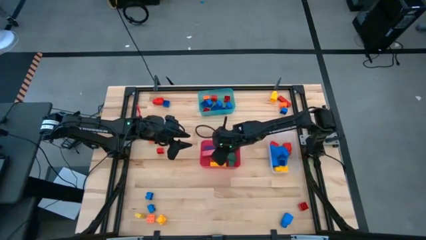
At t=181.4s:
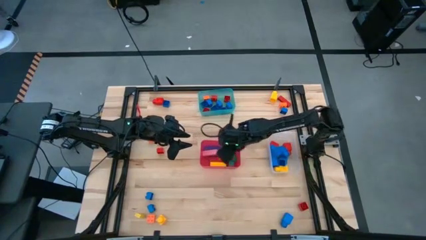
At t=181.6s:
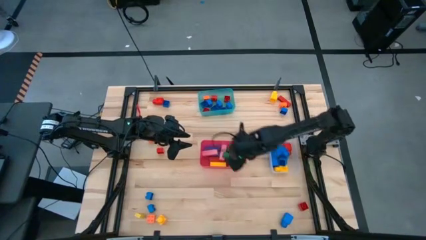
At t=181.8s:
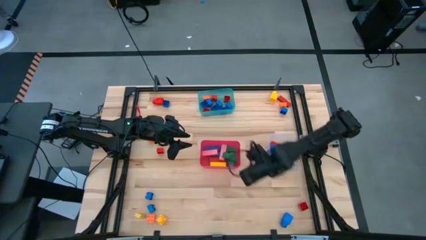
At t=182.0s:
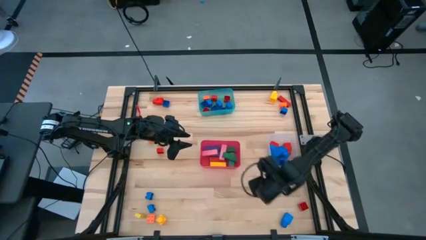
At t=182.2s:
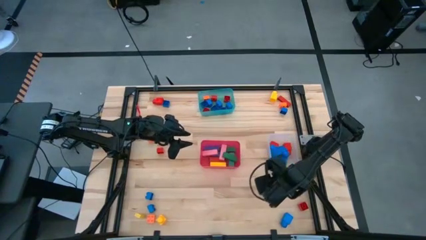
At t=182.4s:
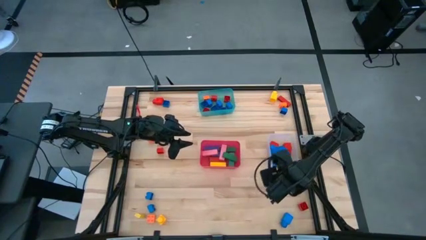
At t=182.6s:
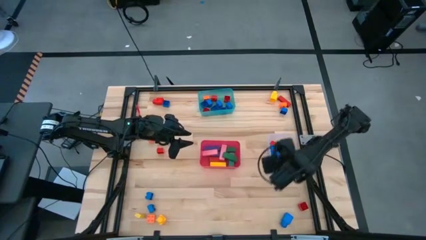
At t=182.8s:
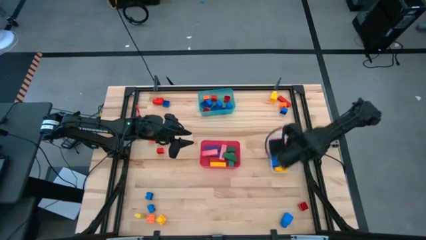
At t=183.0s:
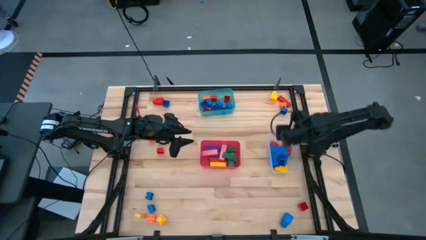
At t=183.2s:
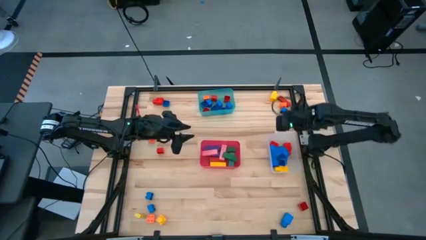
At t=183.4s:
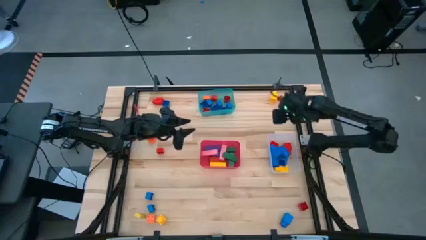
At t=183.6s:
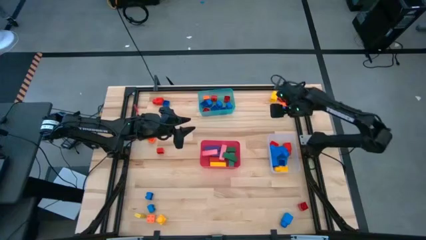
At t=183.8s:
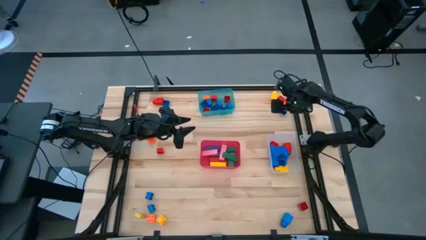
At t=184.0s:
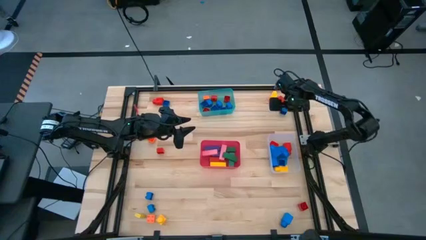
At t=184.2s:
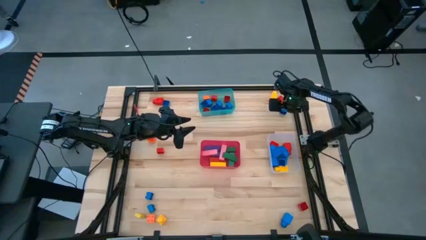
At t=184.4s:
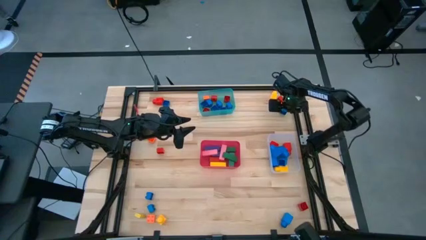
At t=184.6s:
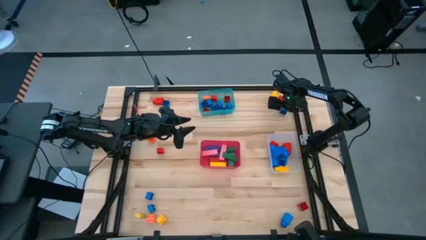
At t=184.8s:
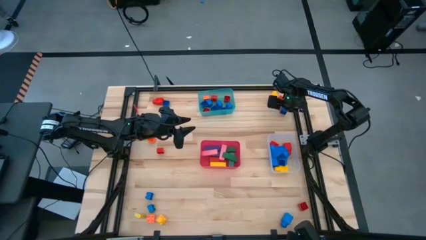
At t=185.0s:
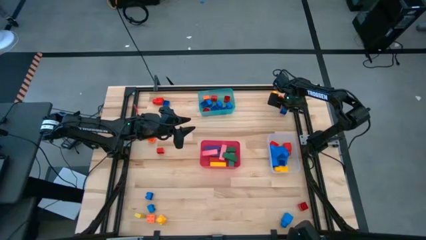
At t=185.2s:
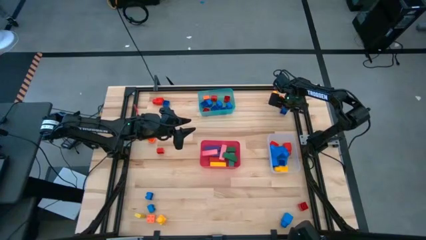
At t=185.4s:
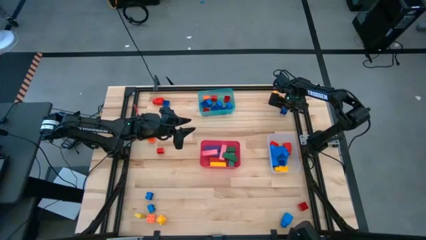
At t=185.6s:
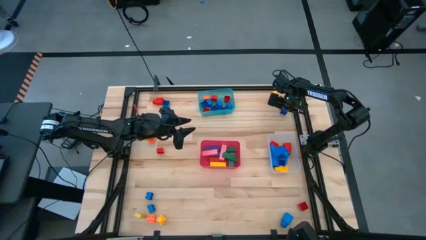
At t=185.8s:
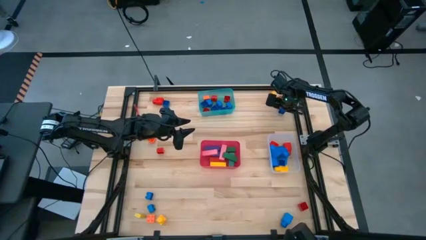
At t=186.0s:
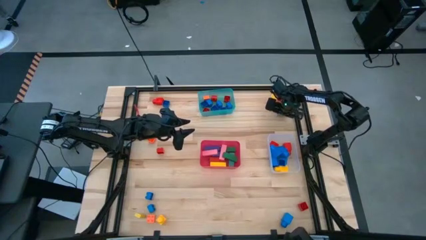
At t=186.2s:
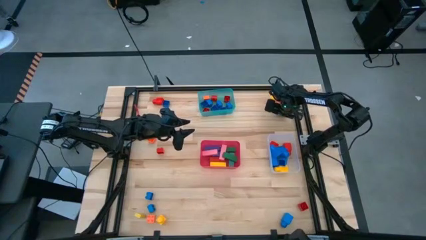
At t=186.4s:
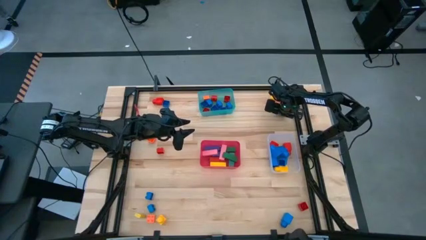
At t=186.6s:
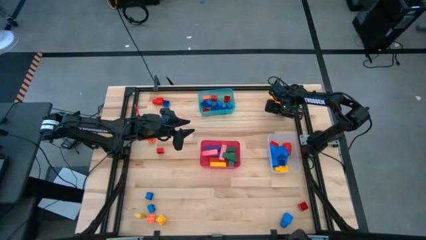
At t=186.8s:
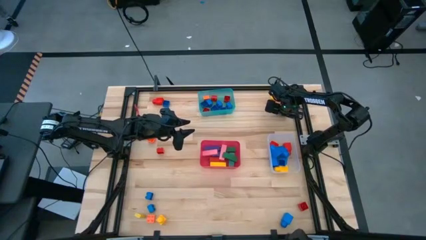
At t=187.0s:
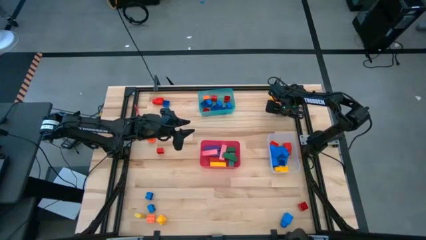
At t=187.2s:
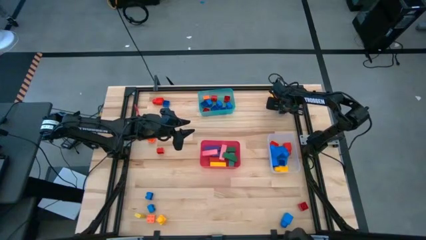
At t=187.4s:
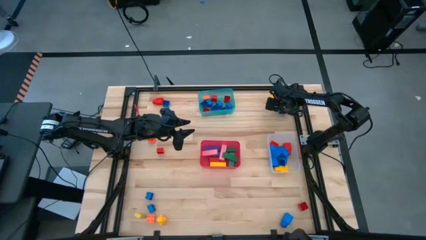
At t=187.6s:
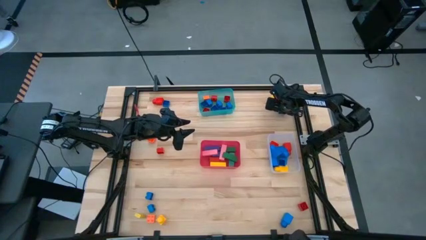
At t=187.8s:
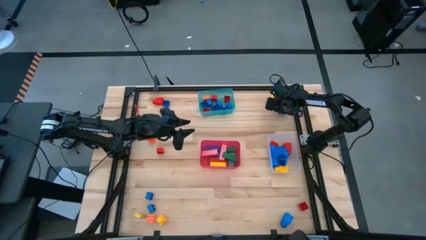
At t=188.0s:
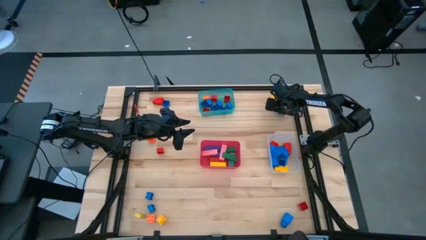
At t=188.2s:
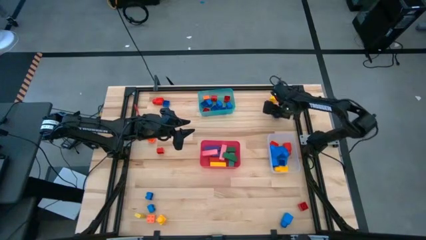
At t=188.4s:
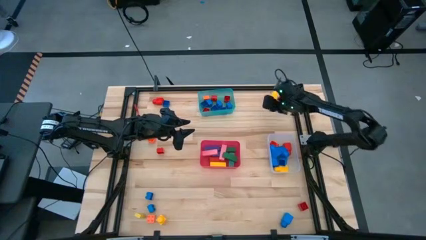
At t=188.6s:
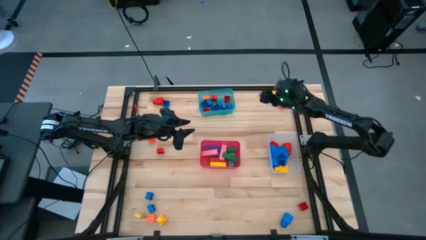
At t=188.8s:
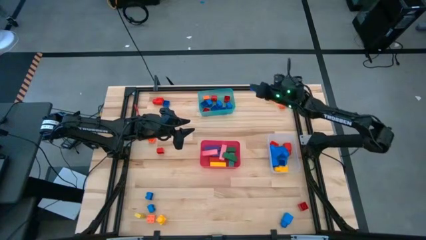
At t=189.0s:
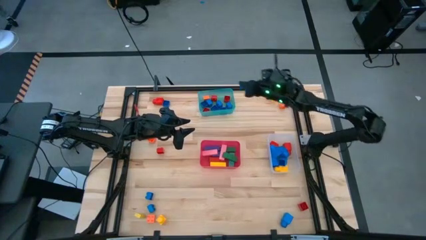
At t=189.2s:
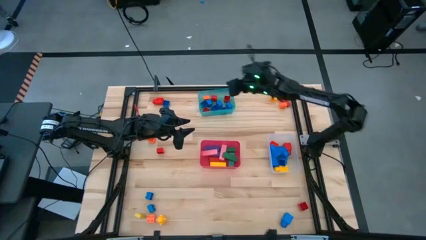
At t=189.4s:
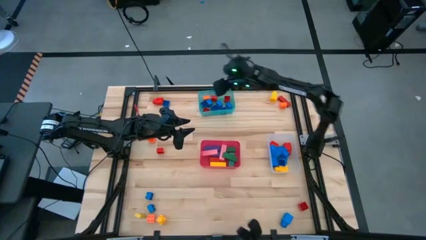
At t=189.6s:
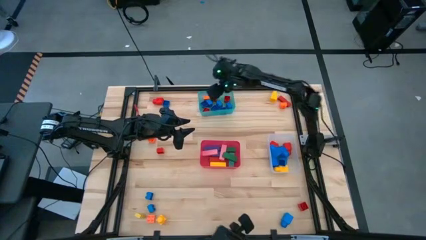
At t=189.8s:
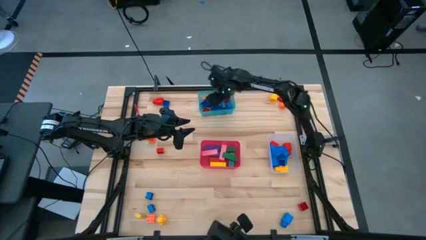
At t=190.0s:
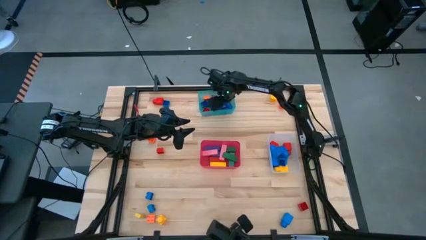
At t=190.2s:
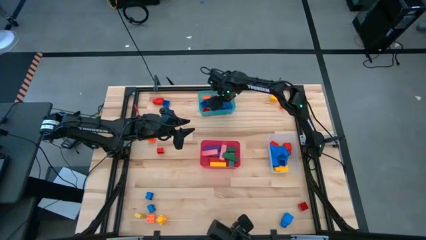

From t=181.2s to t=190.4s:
Task: Sort blocks by size
Put the blue 4 stud game piece into the blue bin

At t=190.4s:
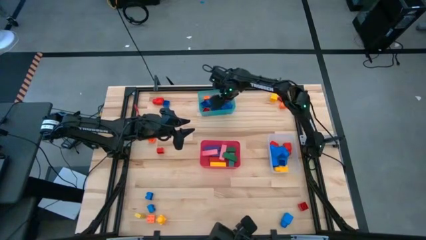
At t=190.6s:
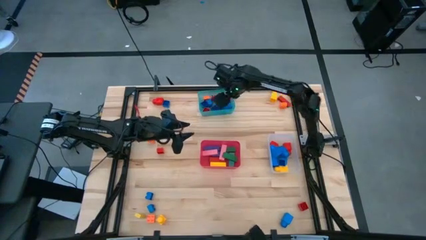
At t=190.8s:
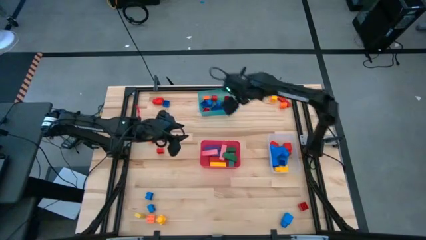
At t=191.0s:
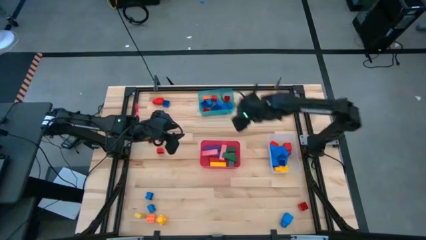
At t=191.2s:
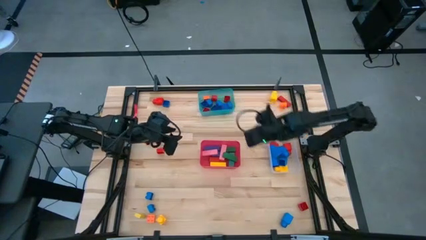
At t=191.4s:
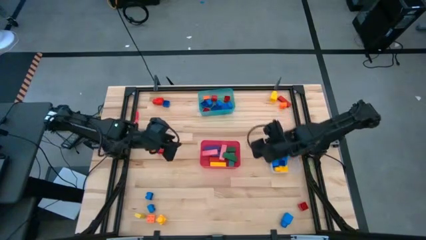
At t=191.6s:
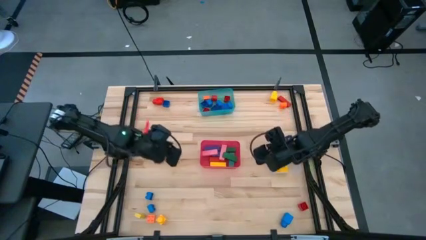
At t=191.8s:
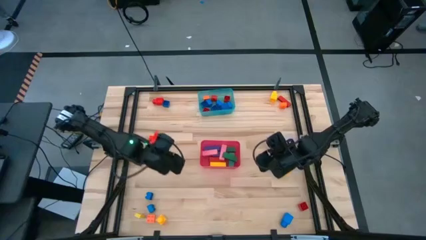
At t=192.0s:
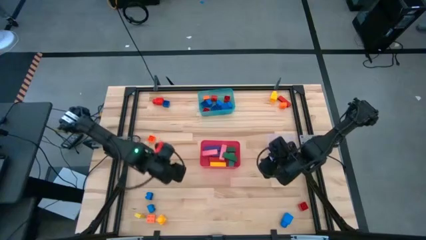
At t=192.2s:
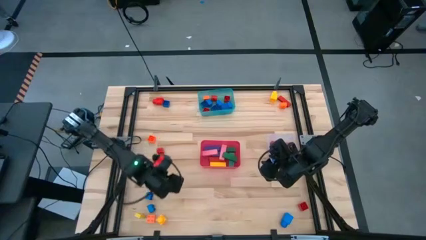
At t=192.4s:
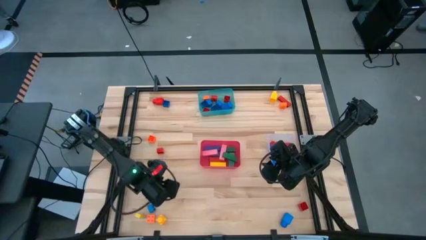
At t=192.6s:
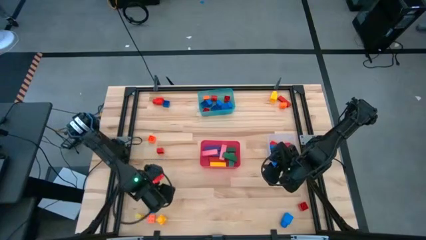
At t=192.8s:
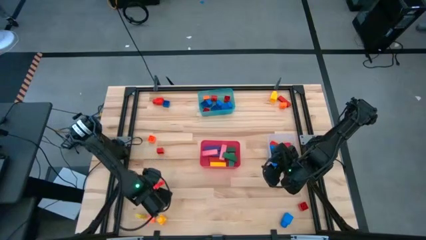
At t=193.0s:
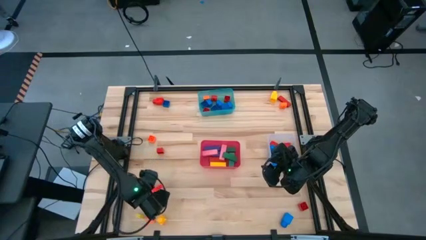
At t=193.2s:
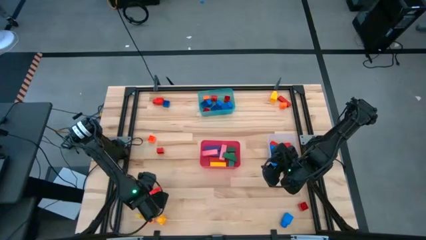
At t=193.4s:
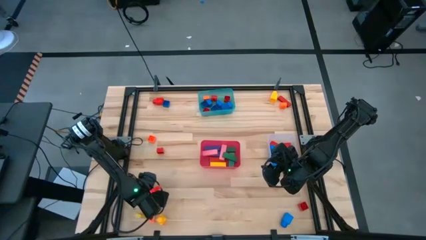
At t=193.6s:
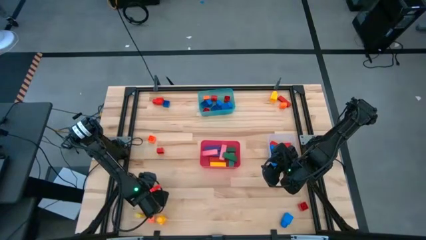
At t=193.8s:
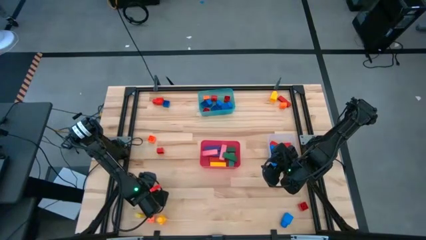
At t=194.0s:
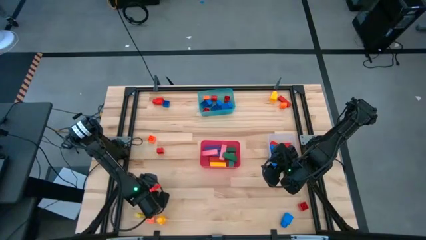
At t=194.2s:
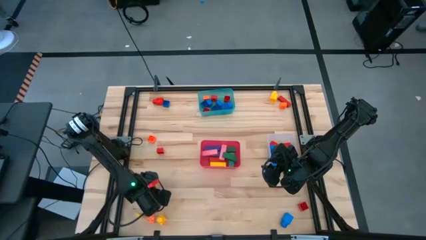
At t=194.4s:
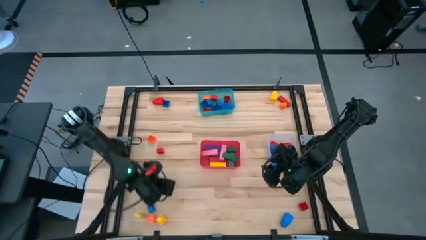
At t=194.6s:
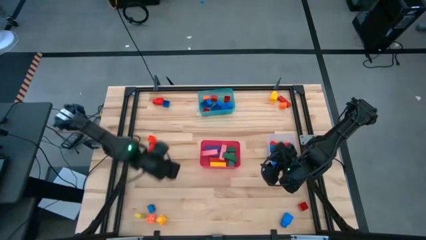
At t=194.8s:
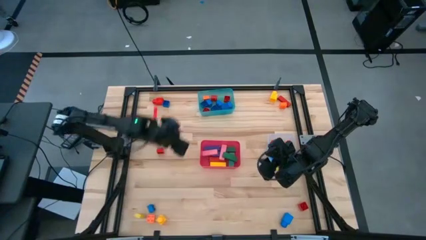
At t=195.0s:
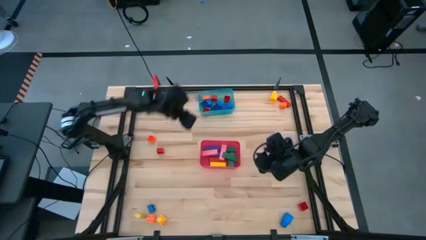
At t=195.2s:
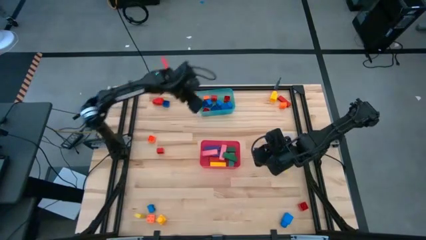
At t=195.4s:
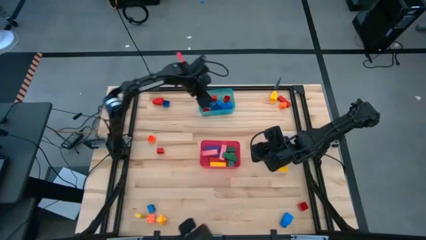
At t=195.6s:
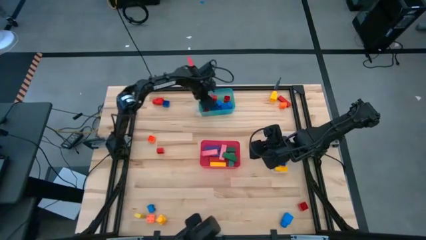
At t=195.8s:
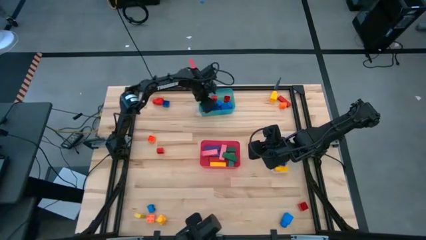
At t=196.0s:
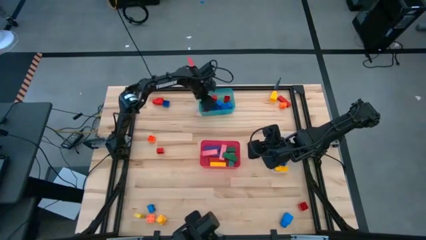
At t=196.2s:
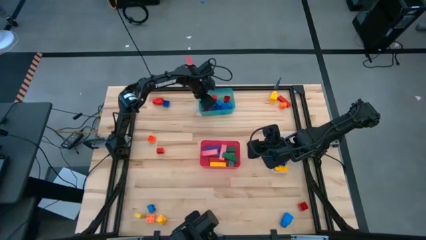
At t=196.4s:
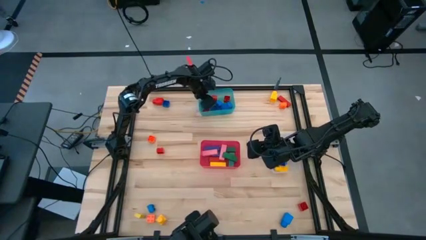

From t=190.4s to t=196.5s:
Put the blue 4 stud game piece into the blue bin
